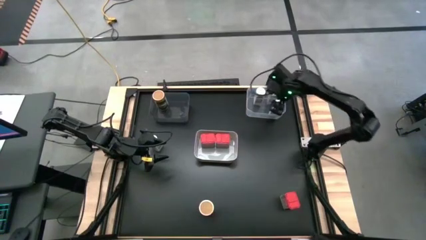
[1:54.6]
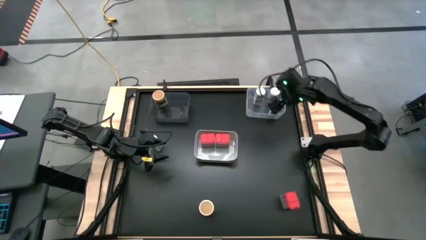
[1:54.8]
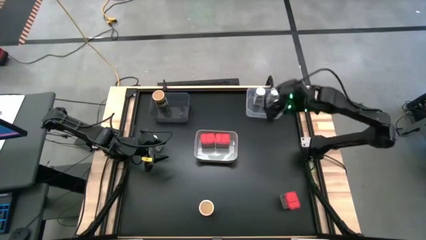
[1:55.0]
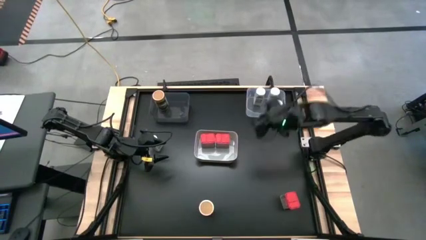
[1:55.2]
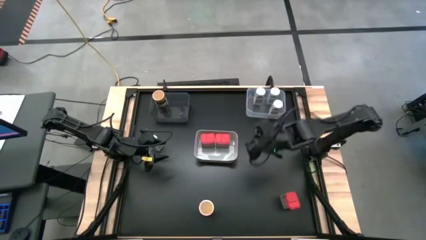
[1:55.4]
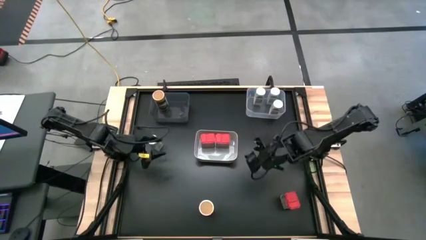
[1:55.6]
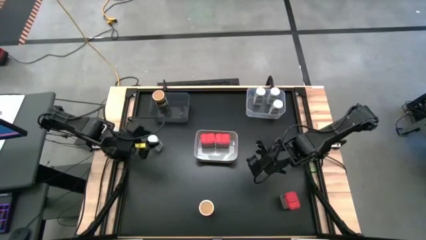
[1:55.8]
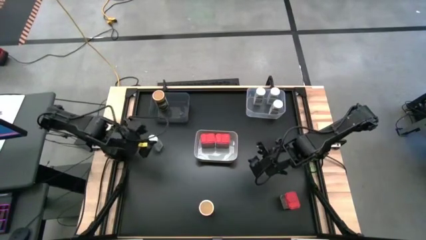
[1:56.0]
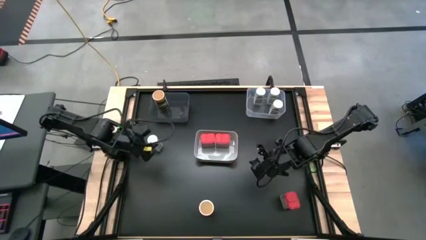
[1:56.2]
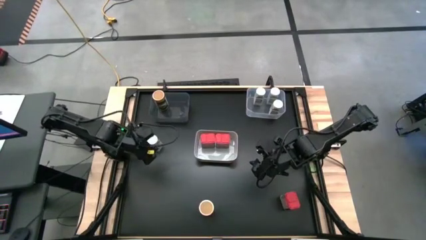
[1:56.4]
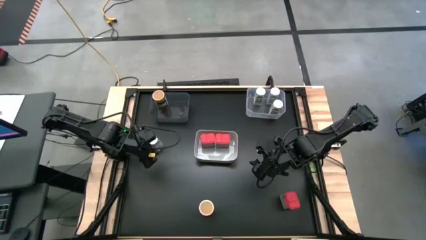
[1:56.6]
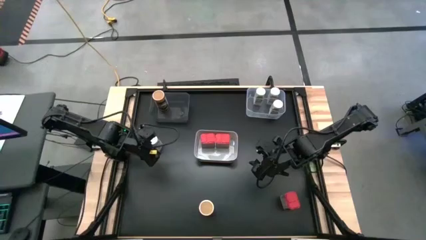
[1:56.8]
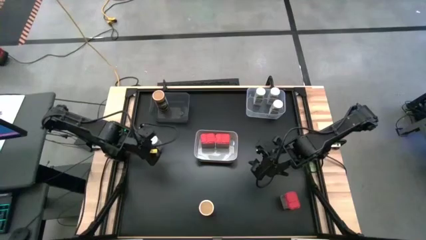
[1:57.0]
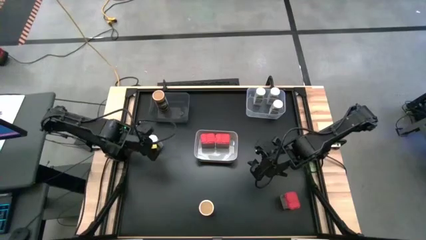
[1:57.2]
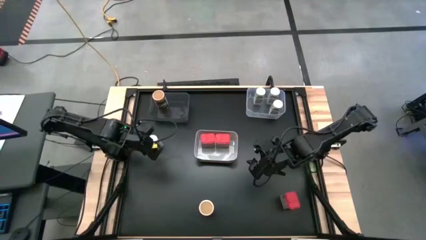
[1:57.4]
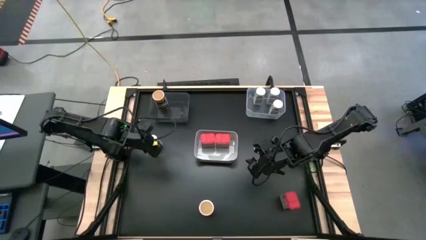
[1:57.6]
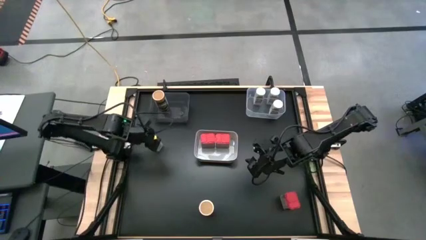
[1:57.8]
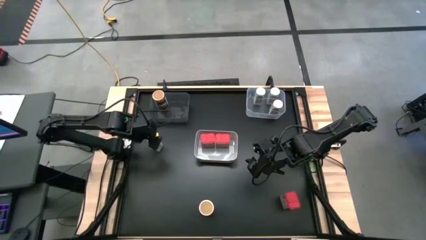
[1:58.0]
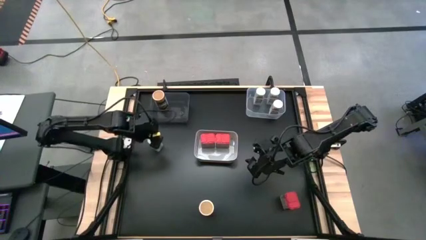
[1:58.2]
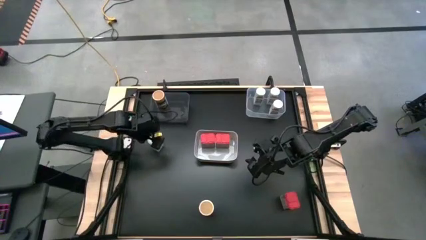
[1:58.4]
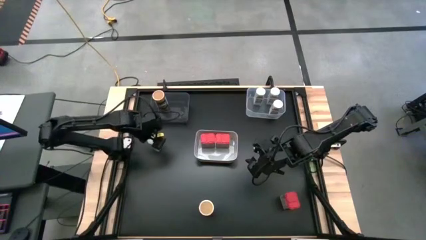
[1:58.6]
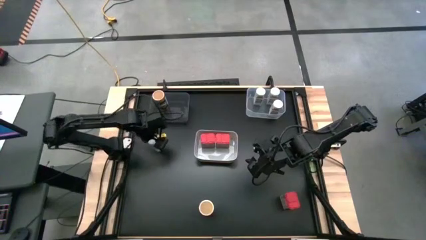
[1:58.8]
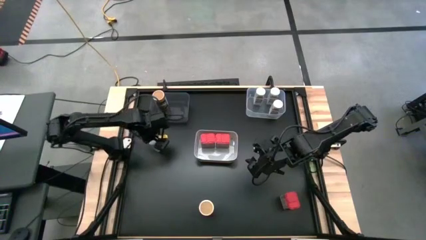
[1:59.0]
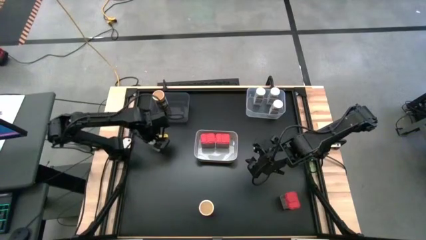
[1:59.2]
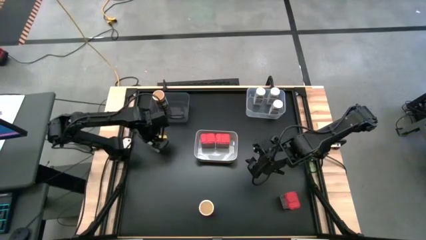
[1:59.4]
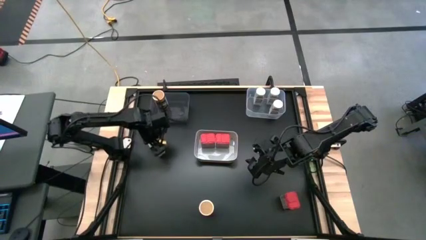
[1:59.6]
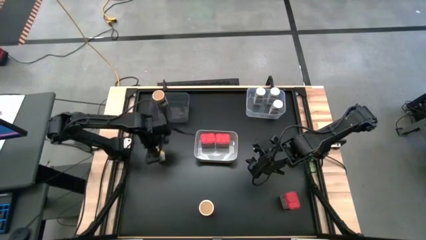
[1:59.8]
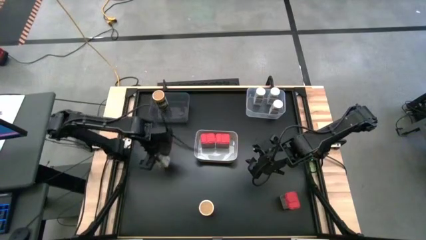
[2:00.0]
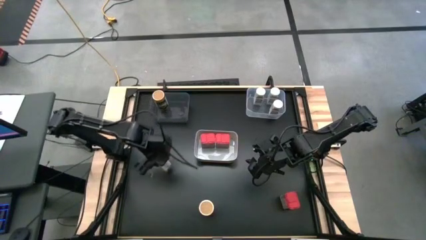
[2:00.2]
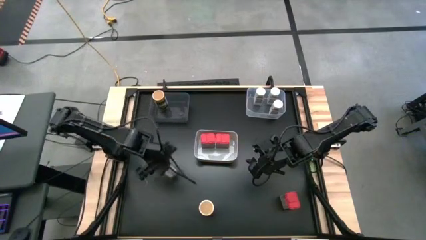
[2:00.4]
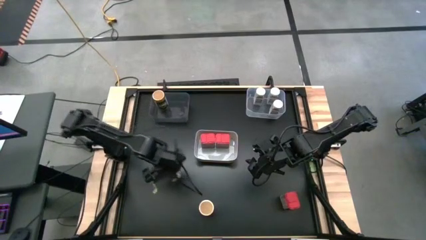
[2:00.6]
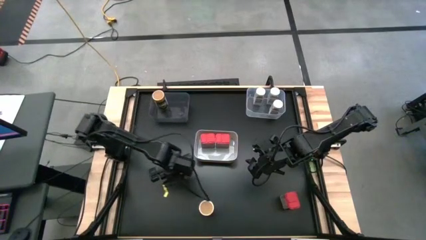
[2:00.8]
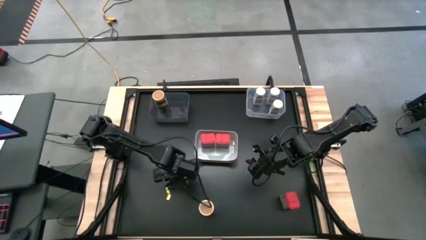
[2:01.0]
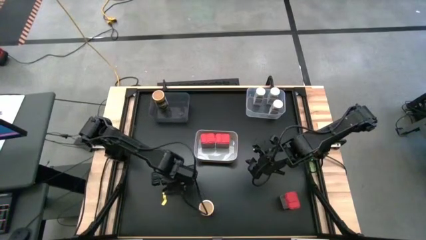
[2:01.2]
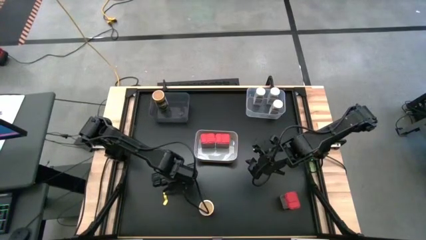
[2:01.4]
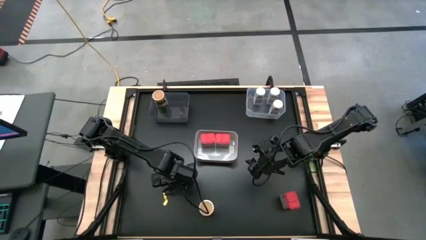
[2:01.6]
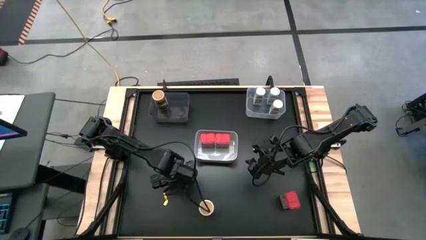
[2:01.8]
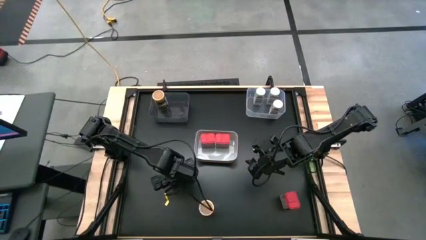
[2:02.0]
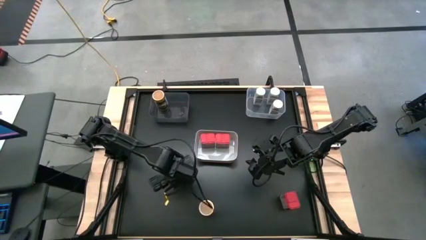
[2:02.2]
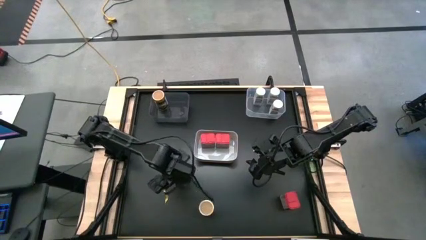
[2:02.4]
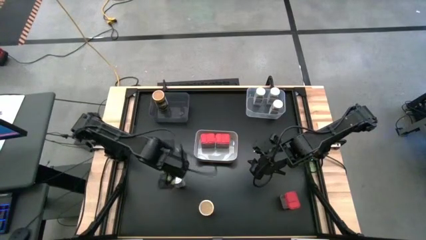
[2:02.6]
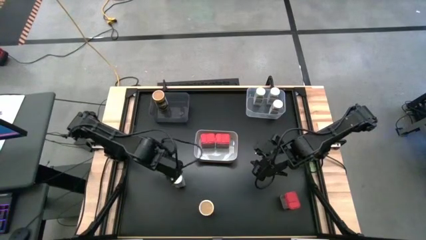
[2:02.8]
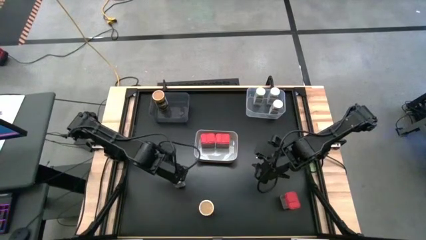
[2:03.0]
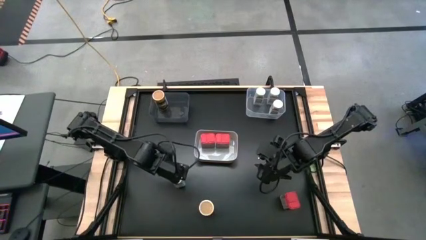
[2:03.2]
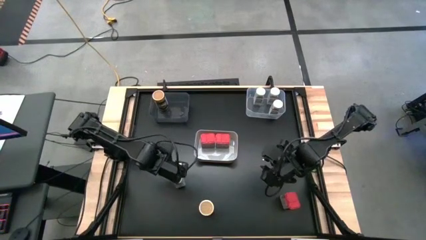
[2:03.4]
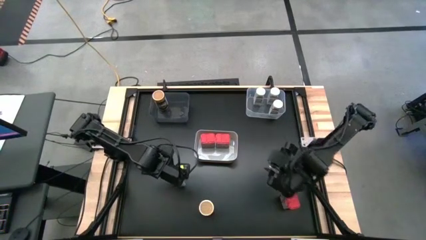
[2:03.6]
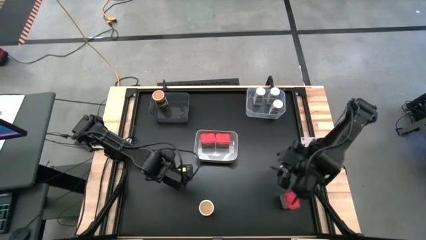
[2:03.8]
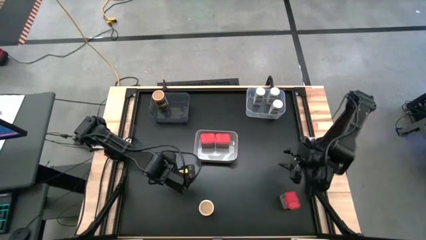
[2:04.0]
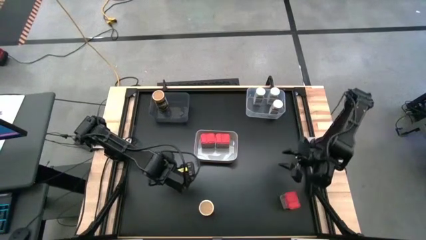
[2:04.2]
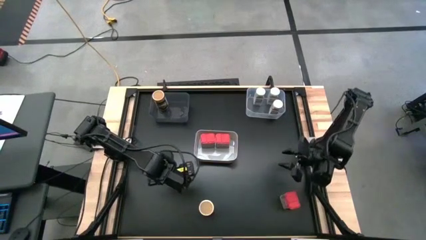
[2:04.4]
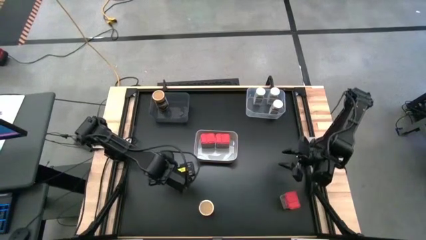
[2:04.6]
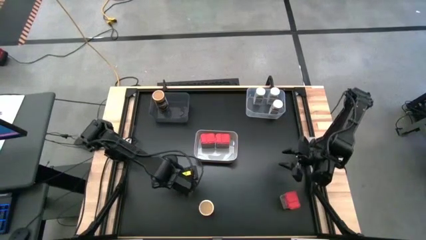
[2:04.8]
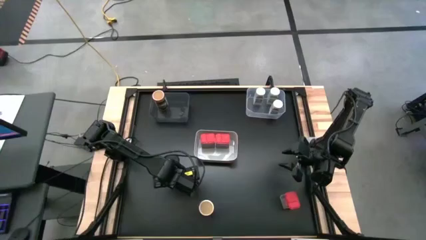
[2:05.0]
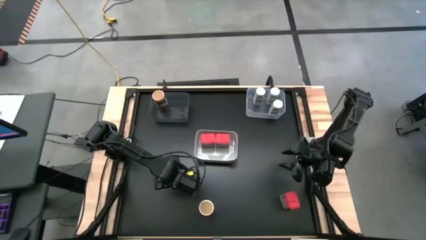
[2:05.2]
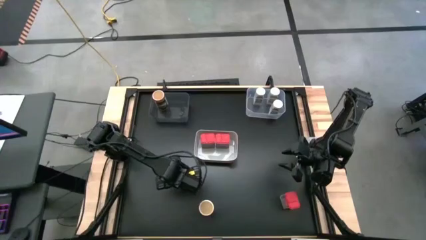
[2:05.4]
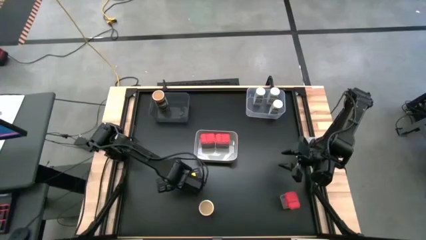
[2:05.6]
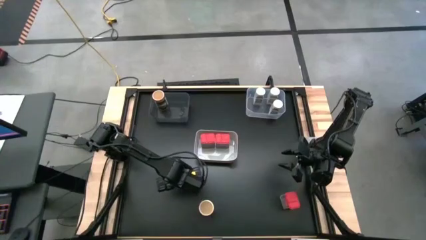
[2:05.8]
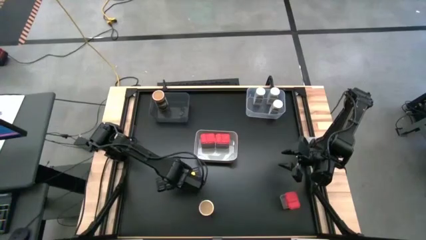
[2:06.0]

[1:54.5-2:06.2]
Task: Sort spices by type
Put the white seasoning bottle into the transparent bin

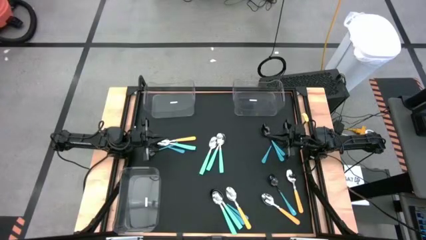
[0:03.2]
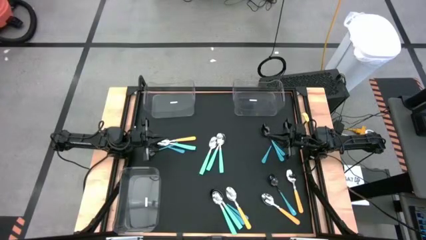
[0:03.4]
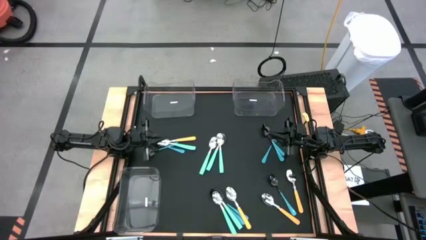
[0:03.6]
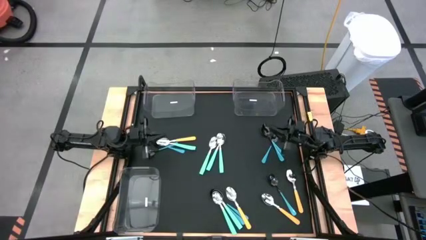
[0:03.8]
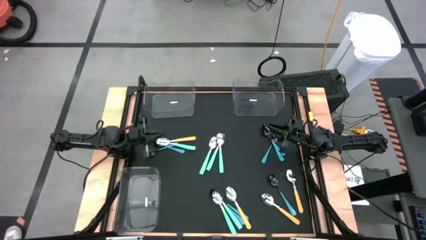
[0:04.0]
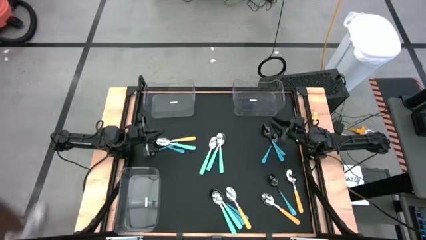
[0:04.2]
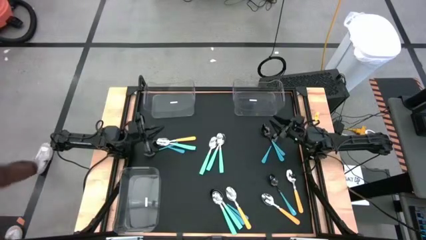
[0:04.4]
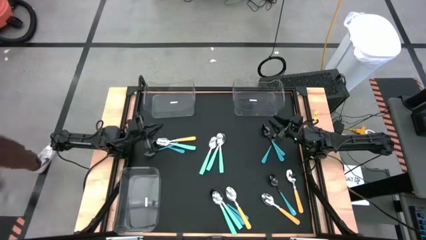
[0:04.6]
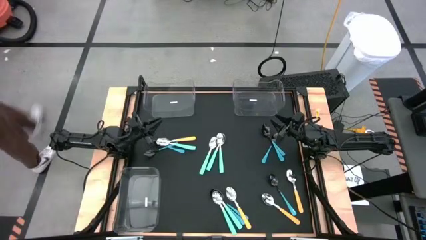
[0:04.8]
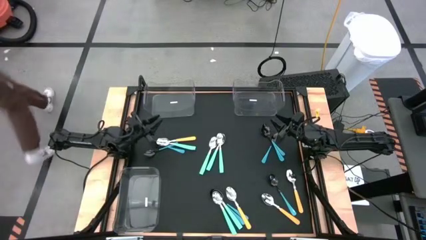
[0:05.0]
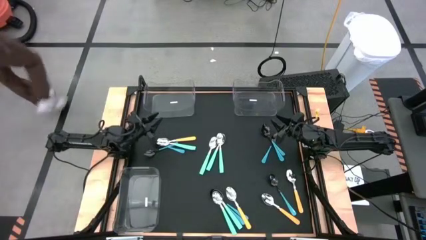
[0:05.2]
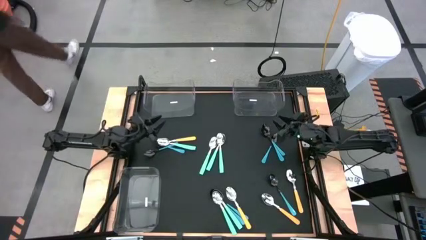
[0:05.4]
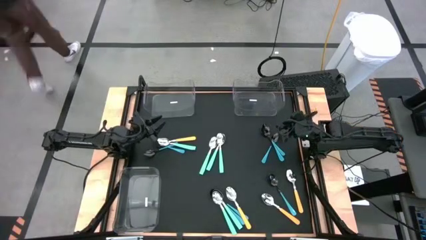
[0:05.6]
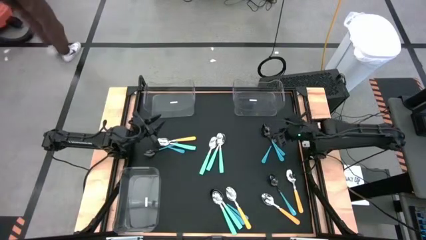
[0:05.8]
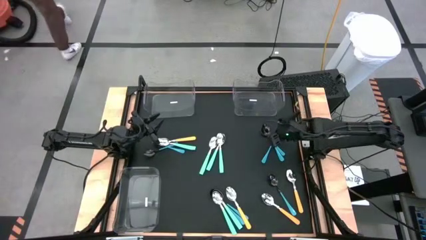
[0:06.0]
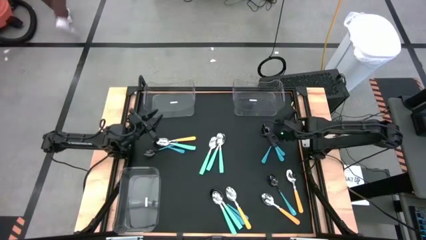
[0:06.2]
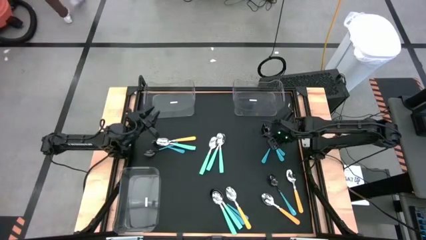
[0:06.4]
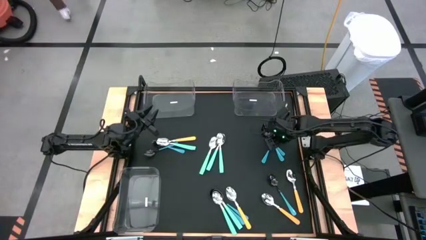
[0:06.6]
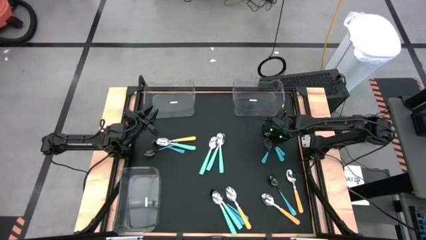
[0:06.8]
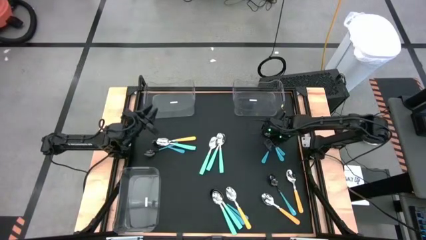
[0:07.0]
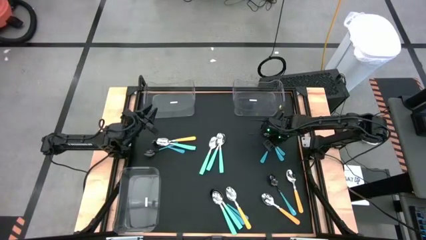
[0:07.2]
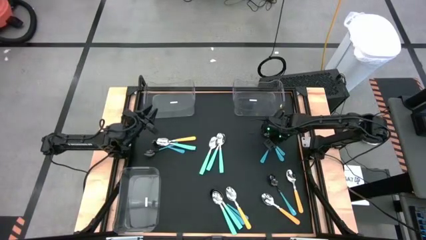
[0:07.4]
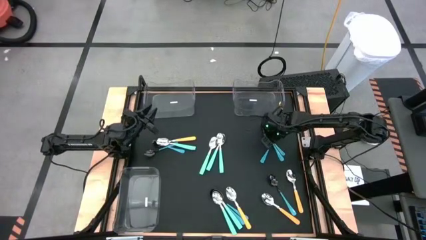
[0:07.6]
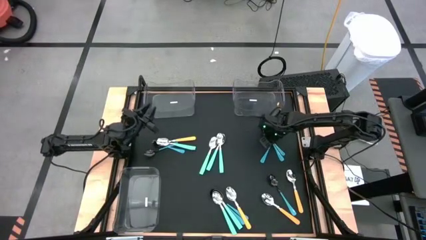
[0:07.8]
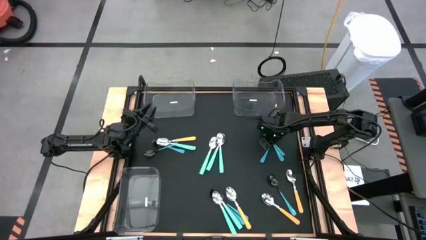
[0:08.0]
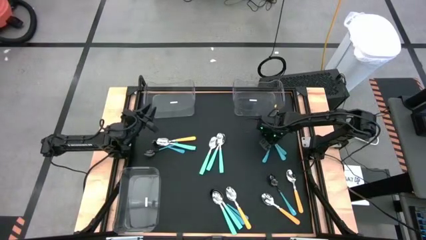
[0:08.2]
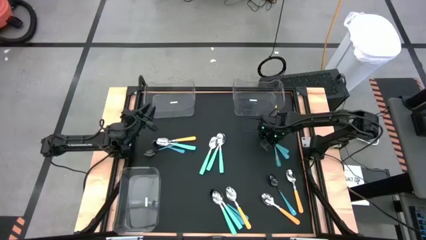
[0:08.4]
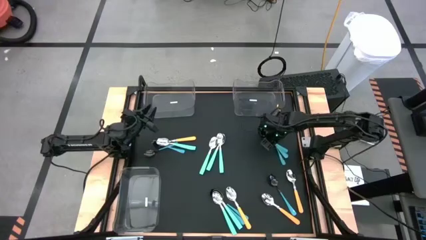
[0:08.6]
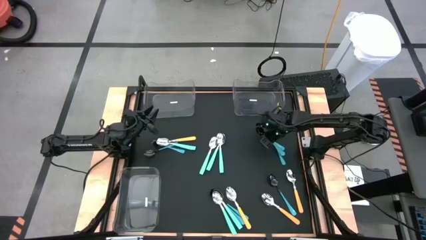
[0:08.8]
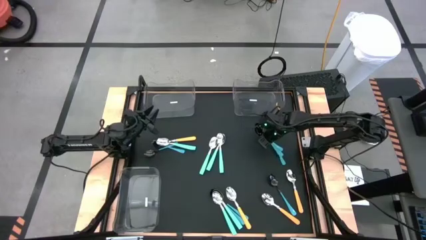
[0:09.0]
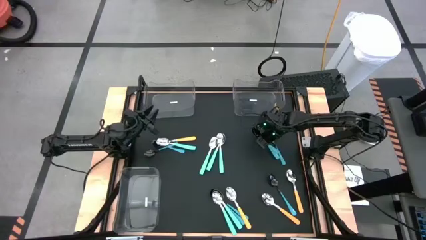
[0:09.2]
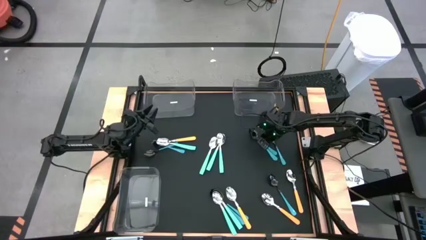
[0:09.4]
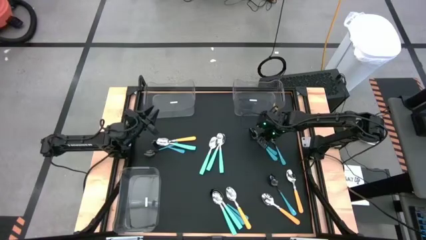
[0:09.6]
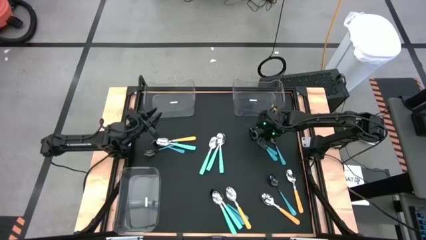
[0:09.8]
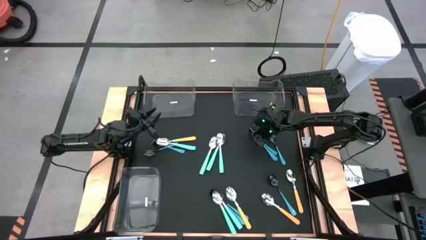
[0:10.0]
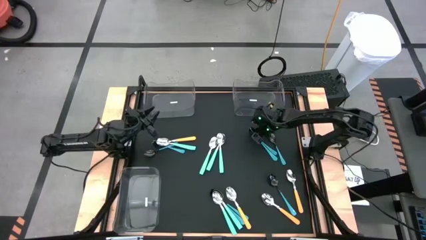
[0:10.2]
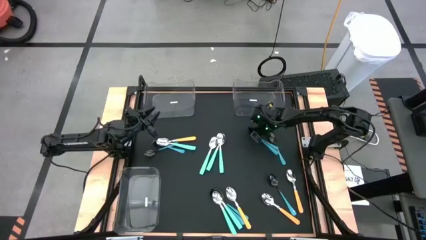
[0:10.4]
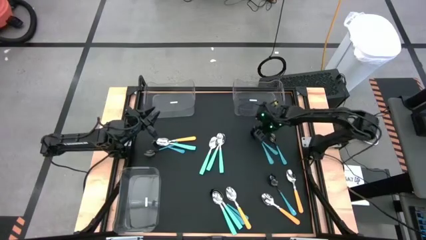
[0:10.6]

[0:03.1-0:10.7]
Task: Sort silverware by color (type)
Put the blue spoon into the top right transparent bin
